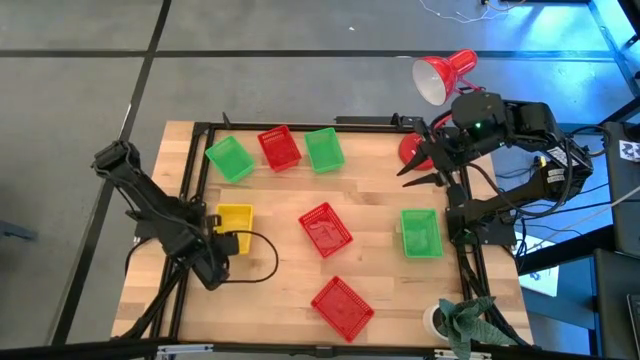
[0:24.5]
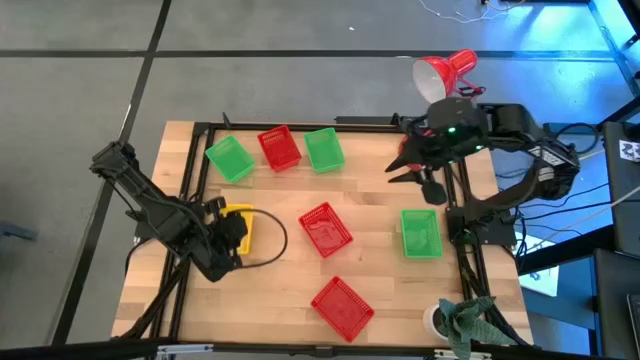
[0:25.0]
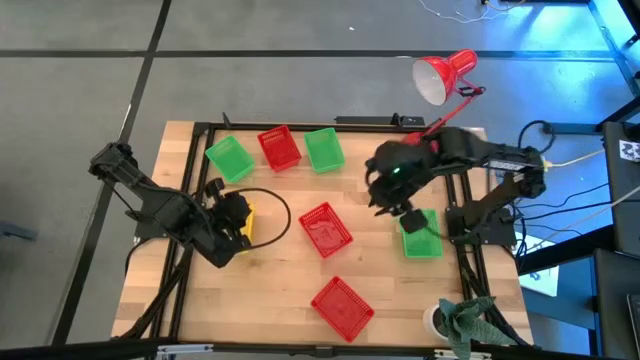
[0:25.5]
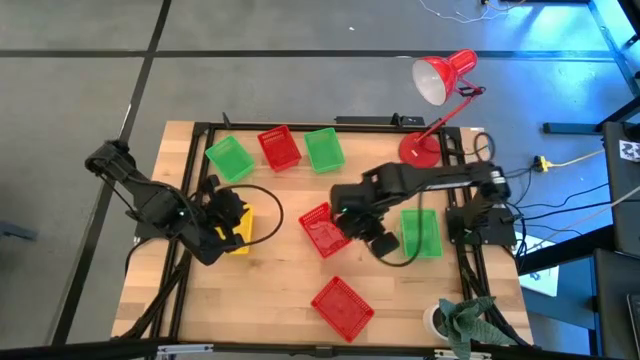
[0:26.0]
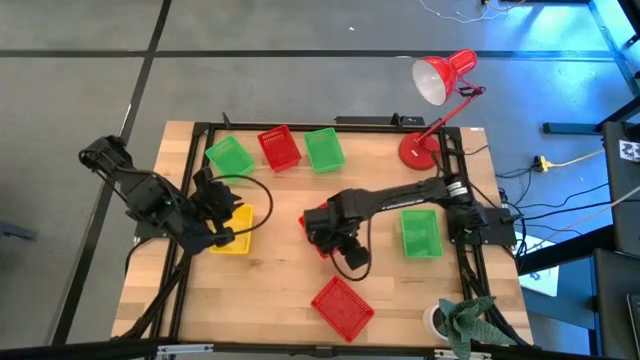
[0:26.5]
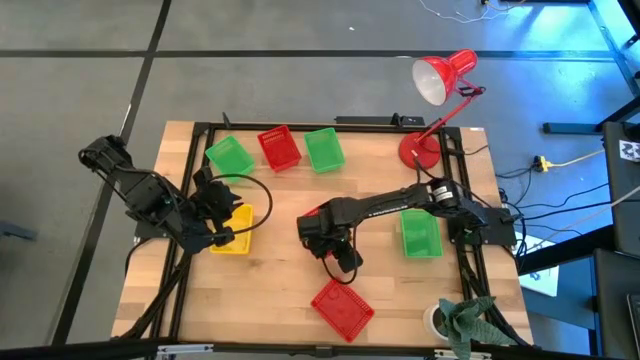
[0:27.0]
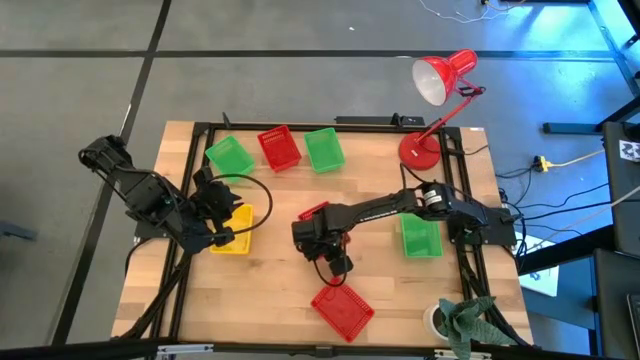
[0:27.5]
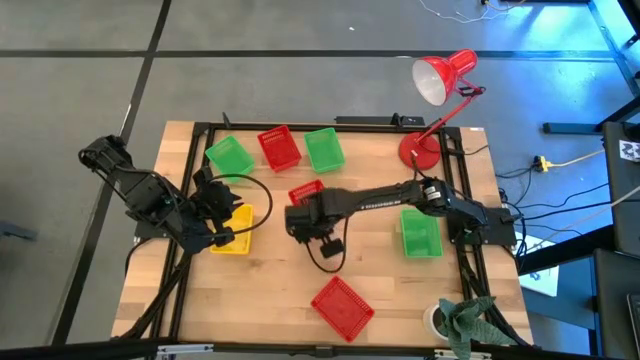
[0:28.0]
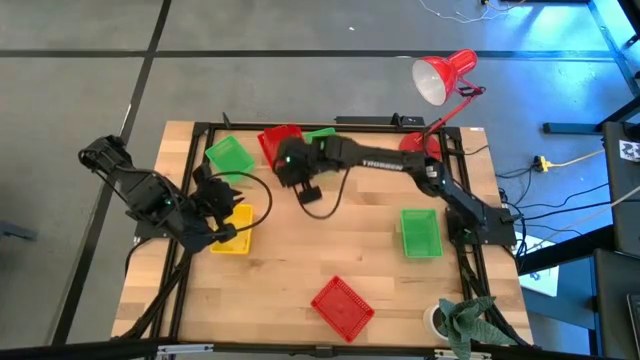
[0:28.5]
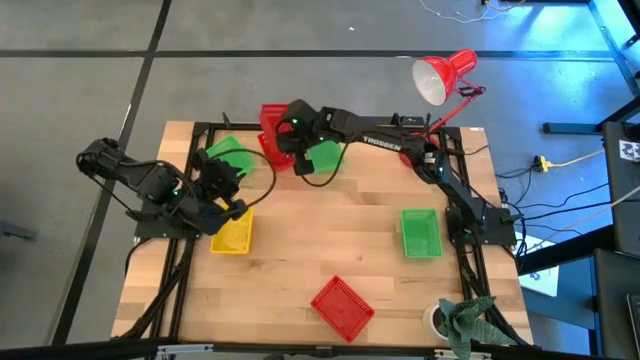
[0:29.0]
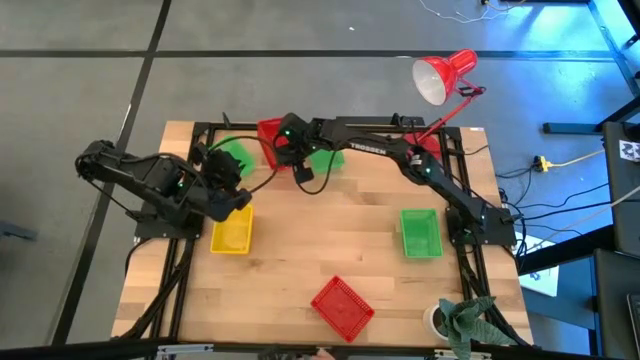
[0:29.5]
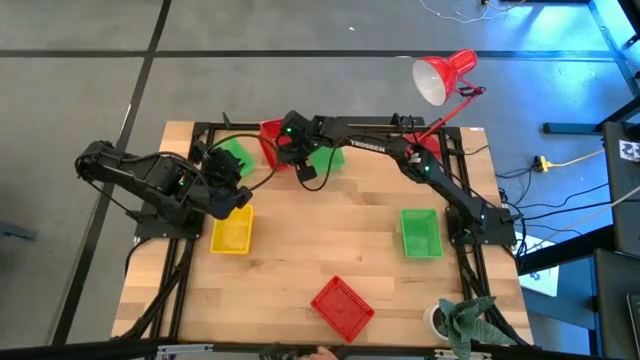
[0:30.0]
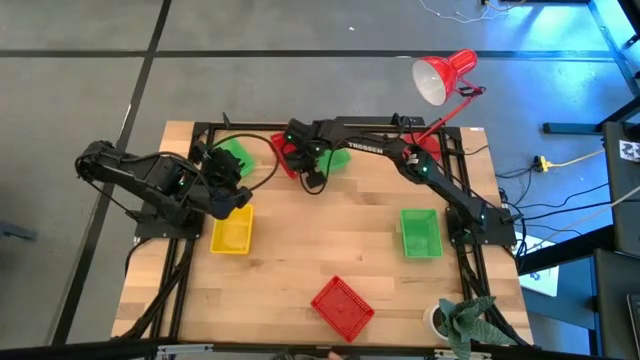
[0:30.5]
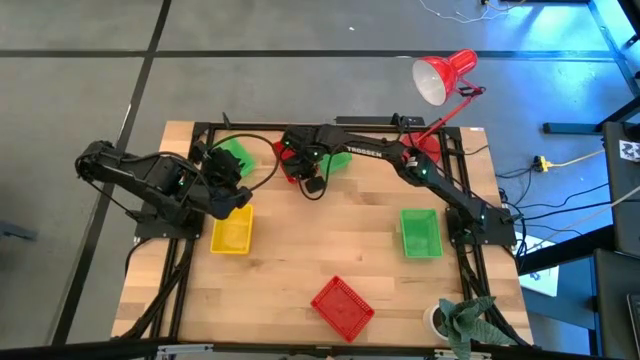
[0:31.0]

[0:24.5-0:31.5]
Stack the center red bin on the top red bin

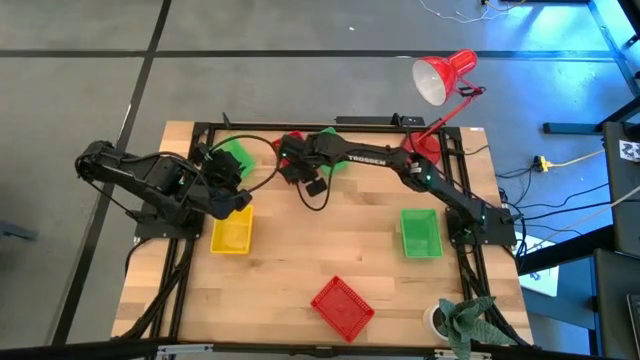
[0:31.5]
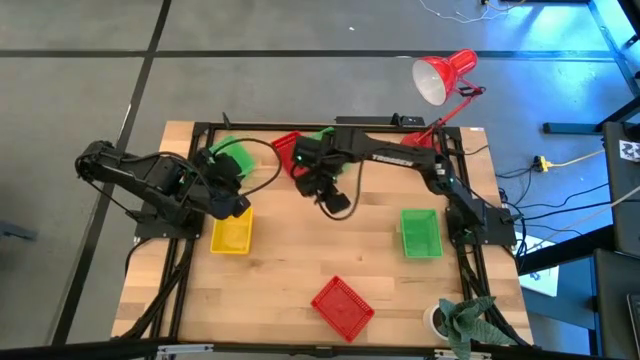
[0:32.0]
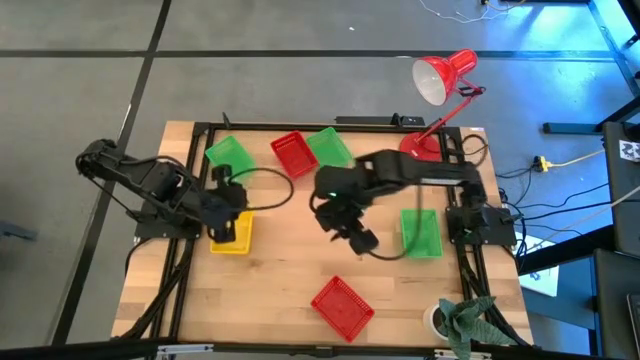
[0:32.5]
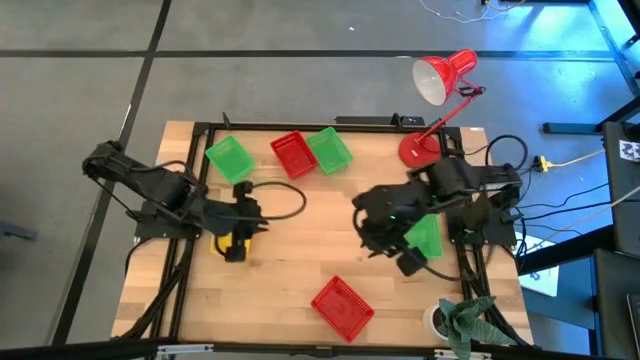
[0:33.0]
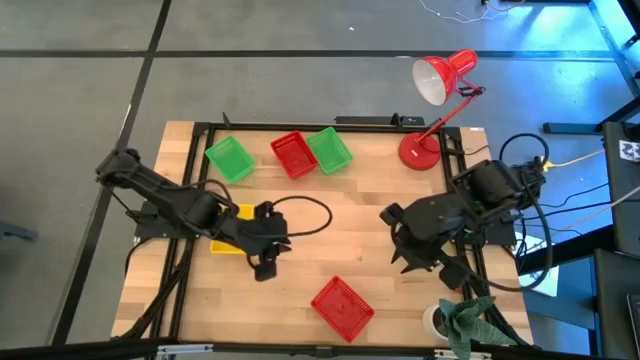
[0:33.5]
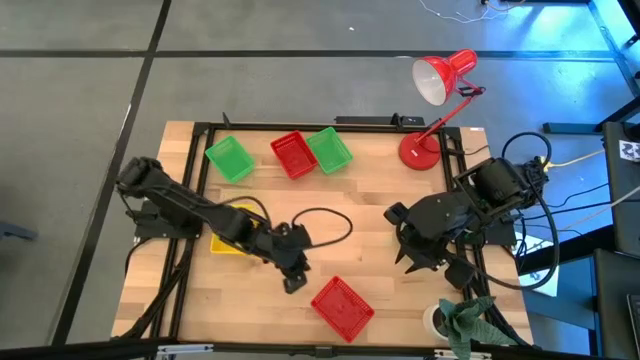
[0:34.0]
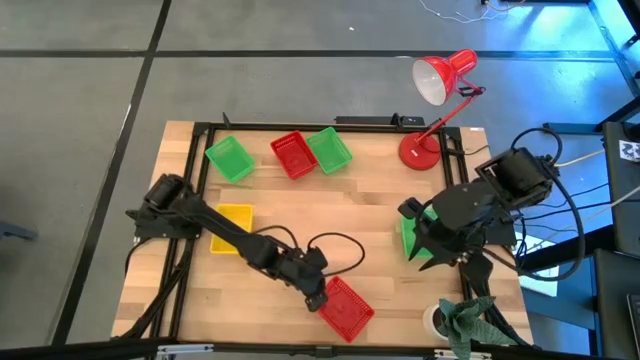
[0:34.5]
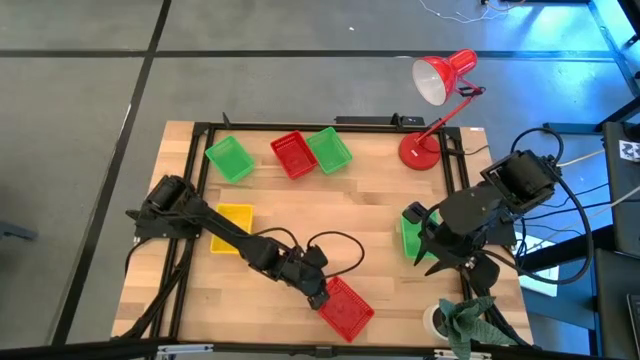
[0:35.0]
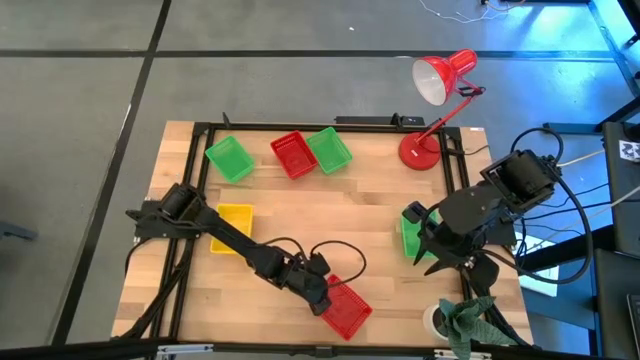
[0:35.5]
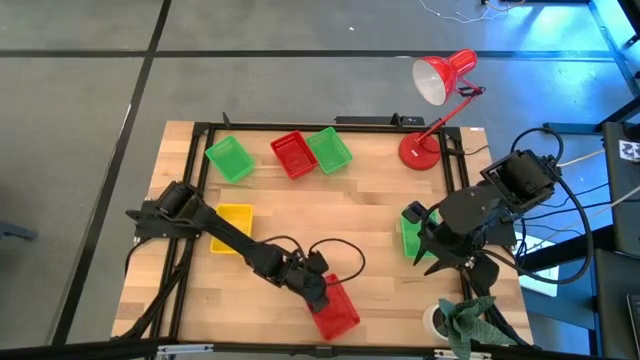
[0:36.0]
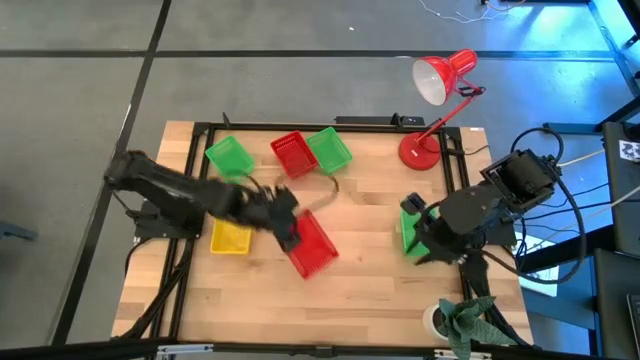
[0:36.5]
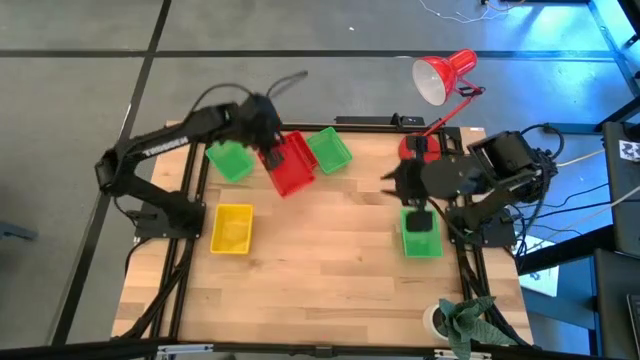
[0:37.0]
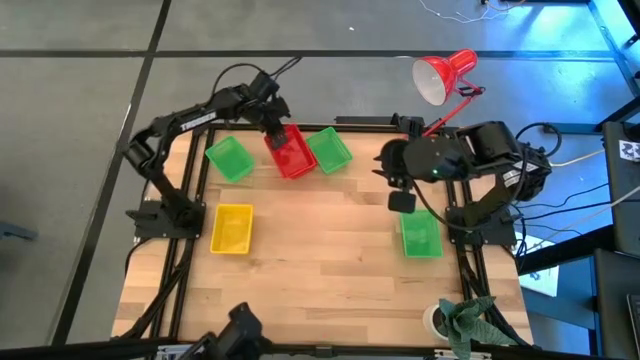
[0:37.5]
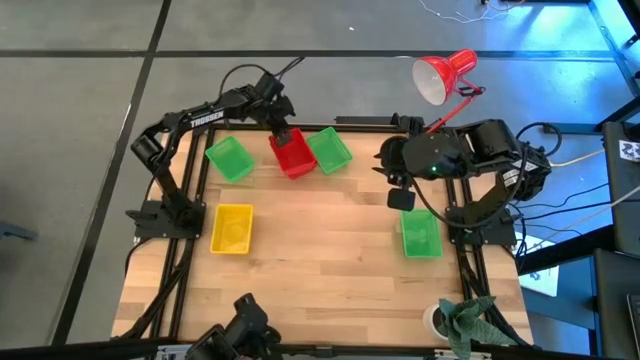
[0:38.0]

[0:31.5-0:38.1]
Stack the bottom red bin on the red bin

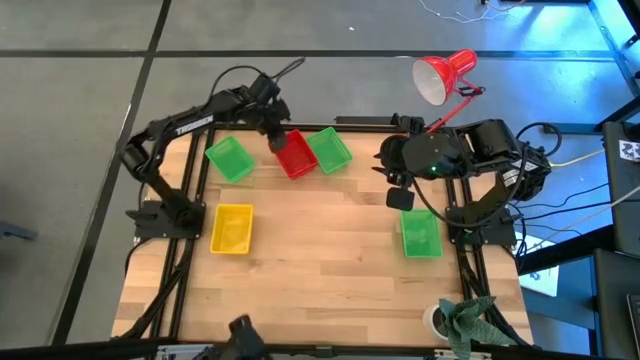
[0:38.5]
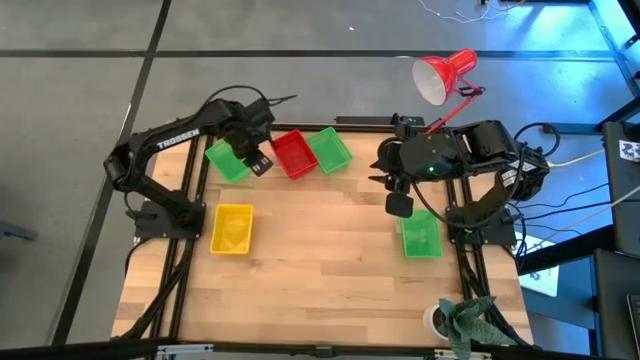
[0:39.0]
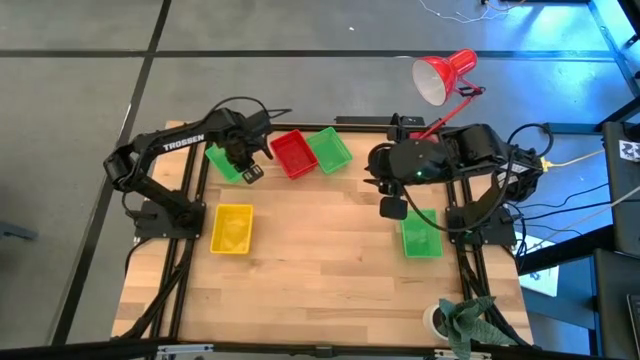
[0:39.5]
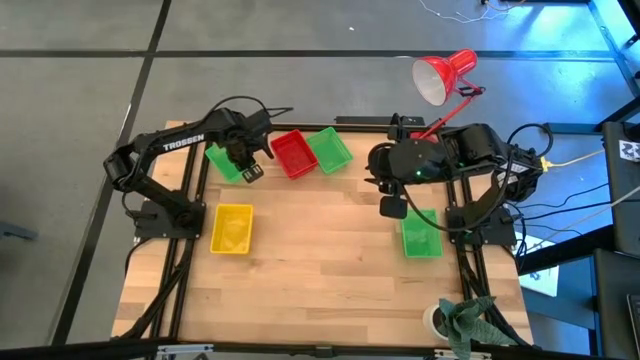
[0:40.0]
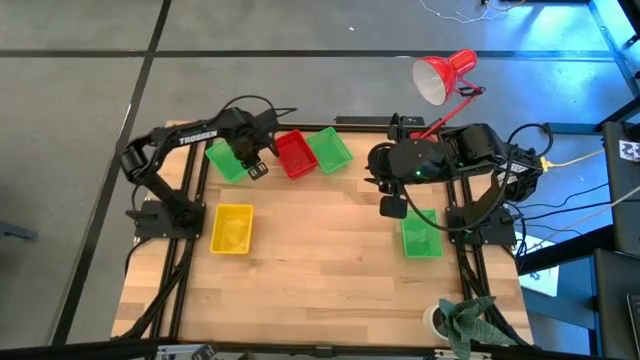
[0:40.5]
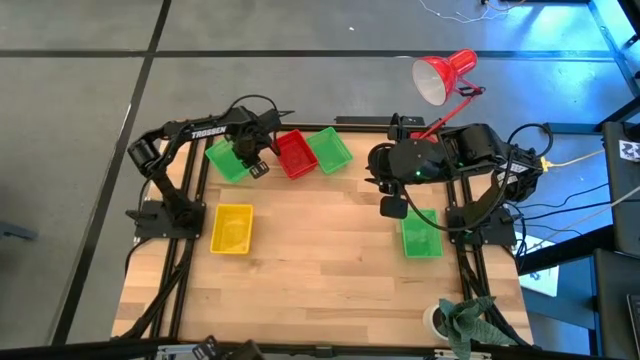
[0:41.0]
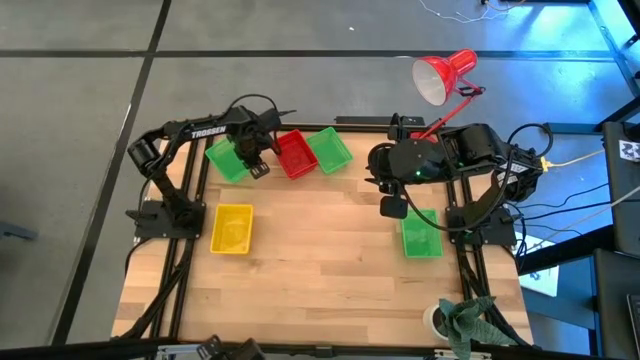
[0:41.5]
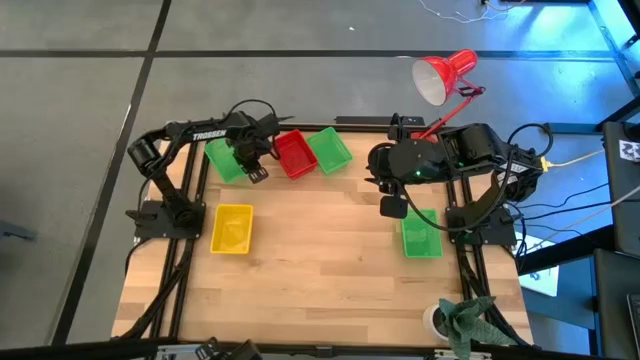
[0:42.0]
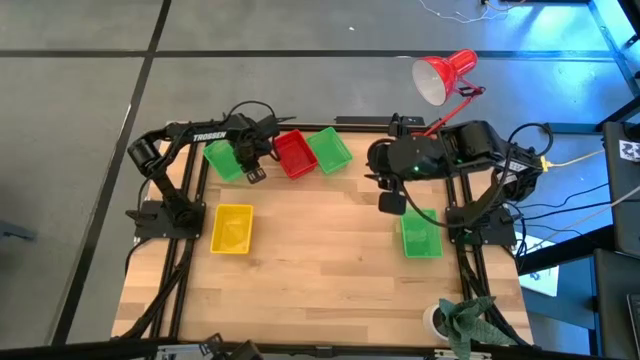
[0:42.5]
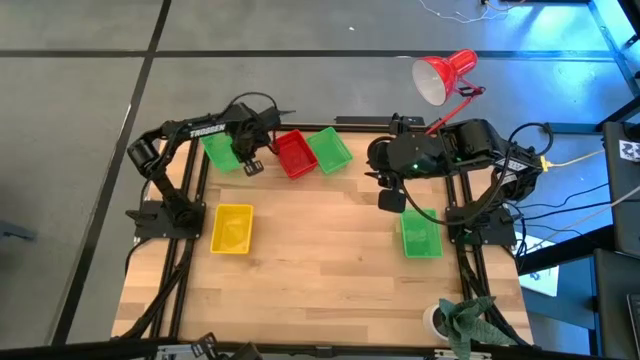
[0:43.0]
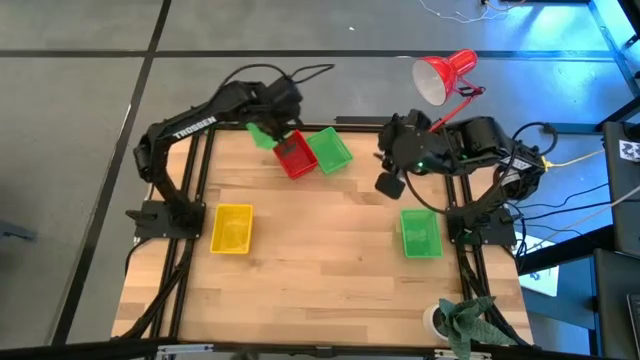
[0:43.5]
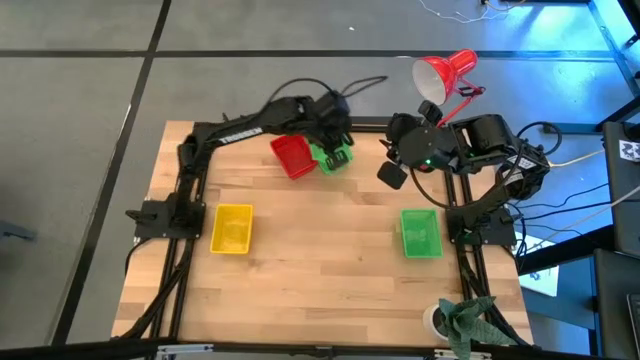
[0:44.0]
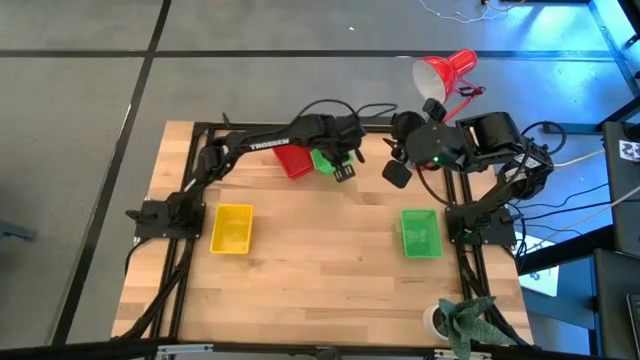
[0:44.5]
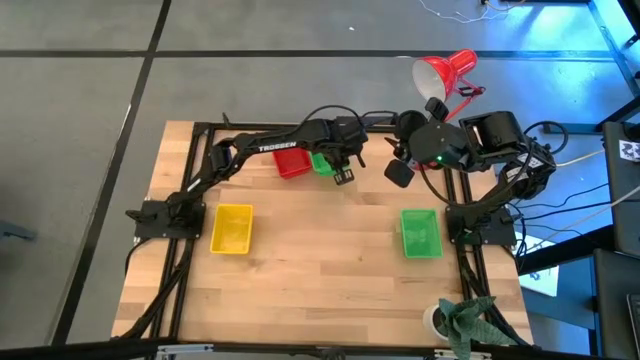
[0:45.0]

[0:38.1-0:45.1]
Stack the top left green bin on the top green bin
